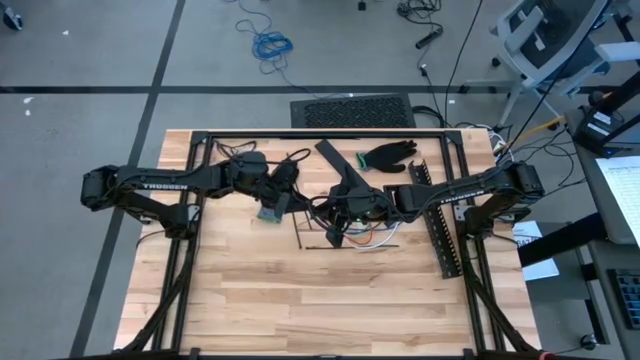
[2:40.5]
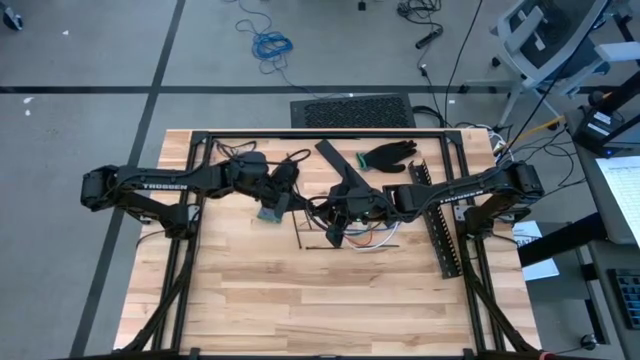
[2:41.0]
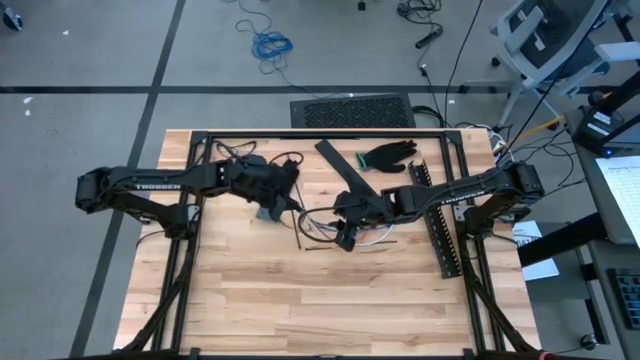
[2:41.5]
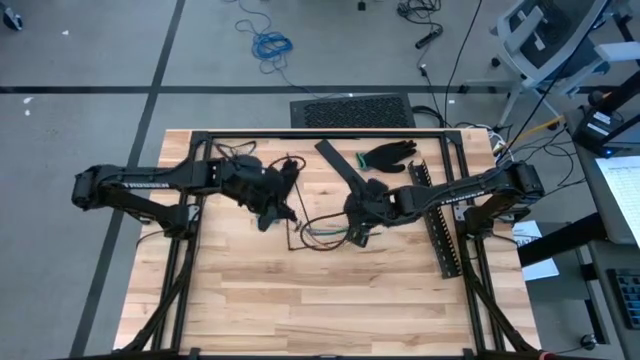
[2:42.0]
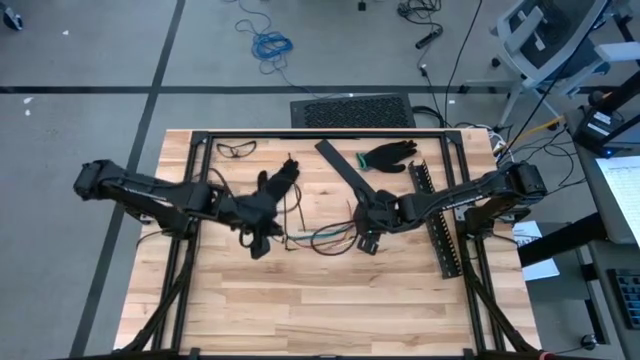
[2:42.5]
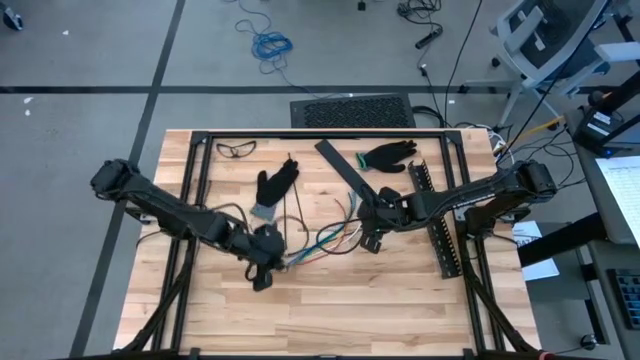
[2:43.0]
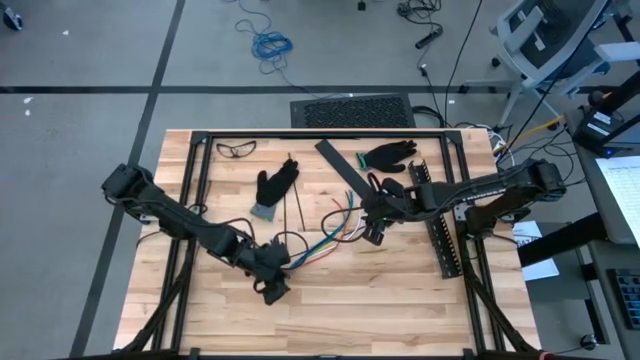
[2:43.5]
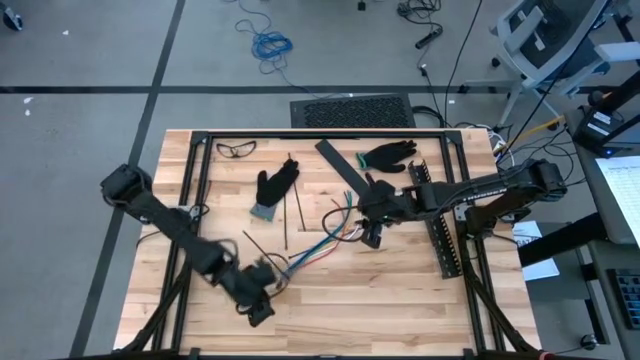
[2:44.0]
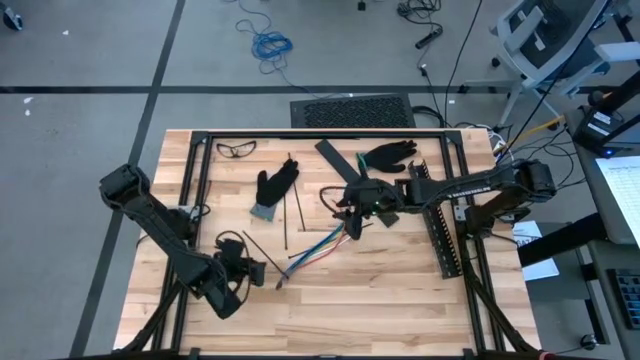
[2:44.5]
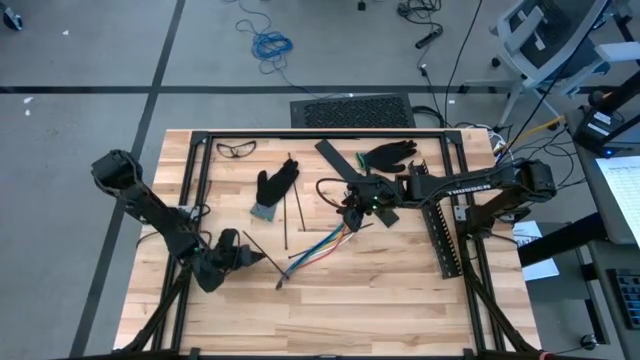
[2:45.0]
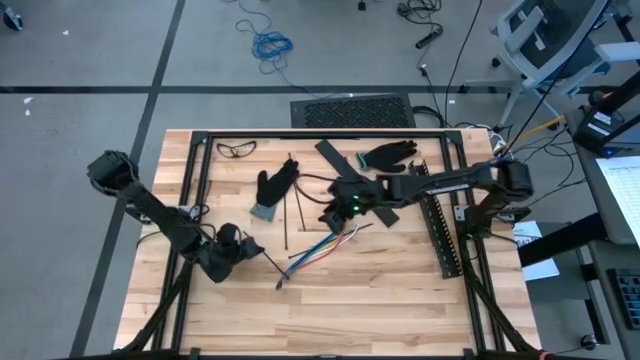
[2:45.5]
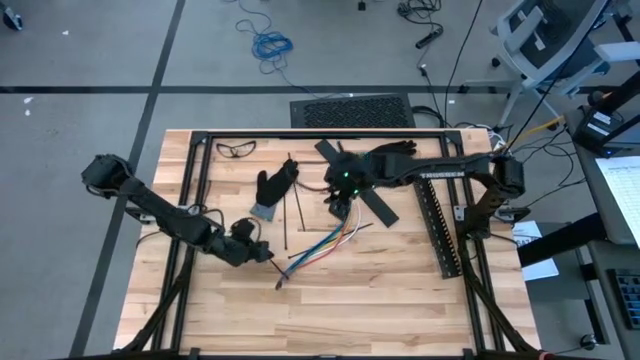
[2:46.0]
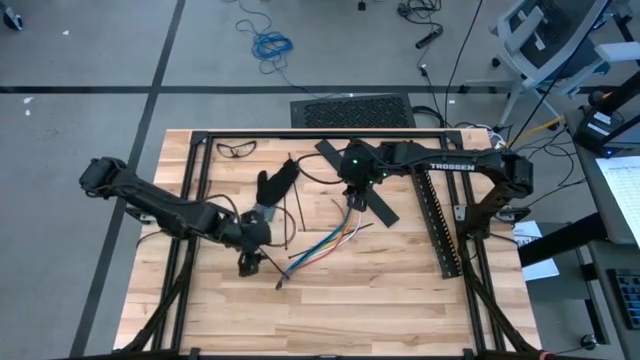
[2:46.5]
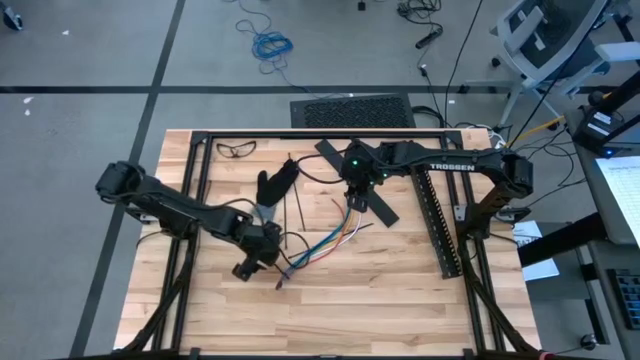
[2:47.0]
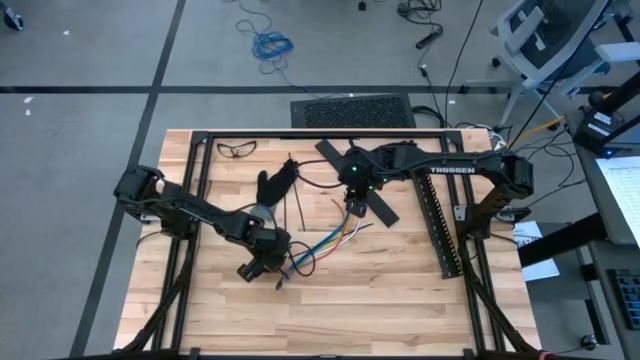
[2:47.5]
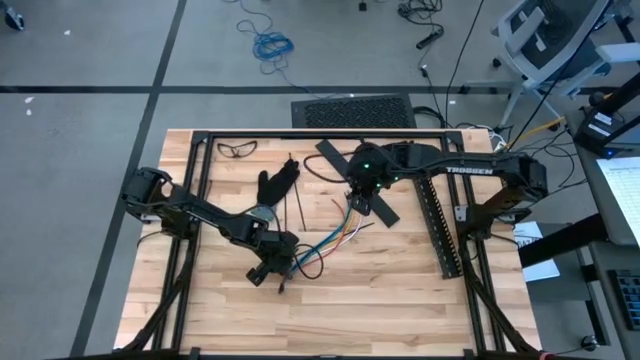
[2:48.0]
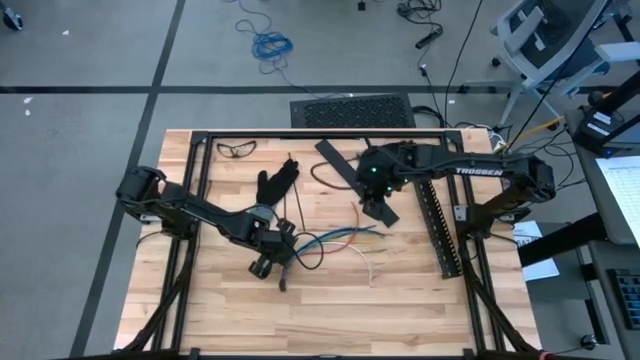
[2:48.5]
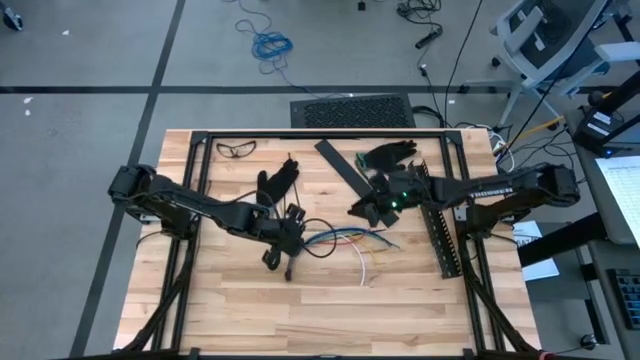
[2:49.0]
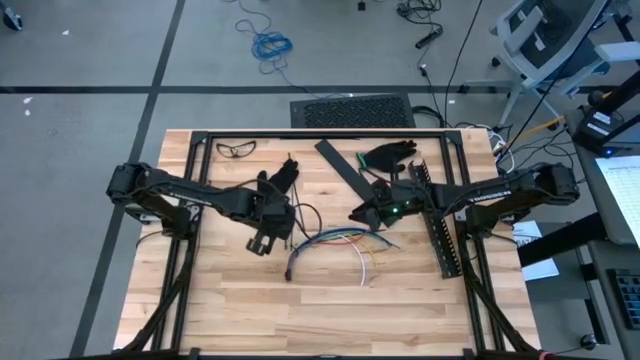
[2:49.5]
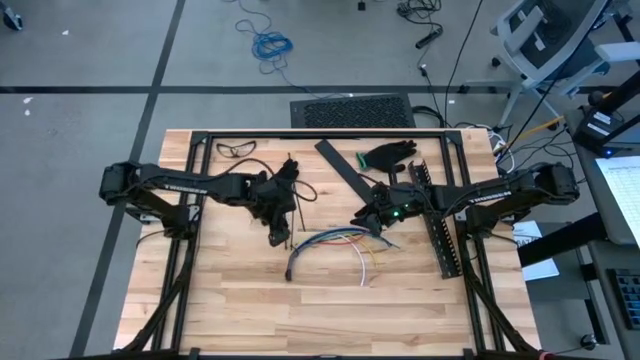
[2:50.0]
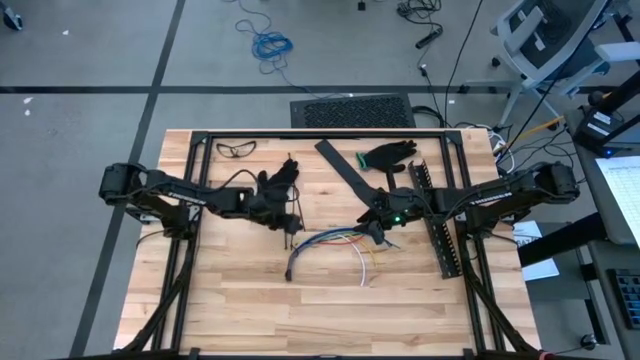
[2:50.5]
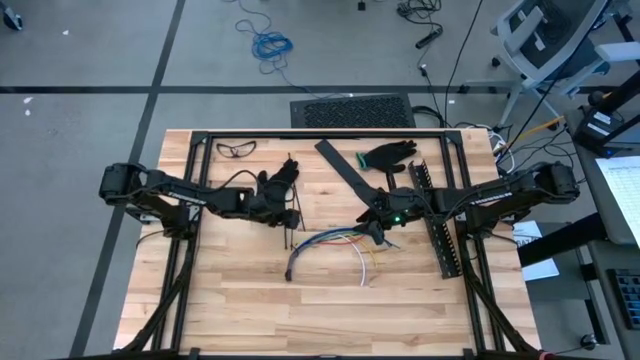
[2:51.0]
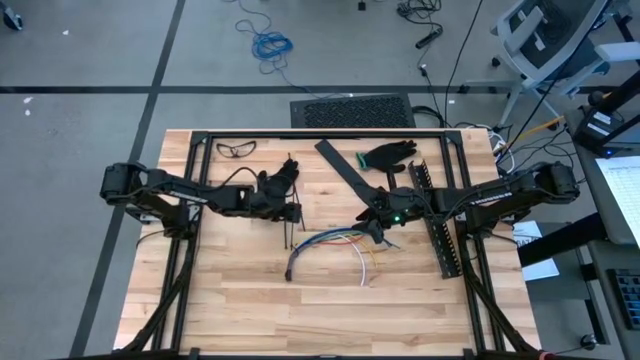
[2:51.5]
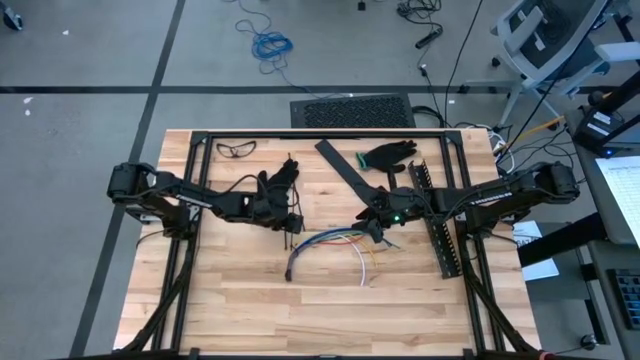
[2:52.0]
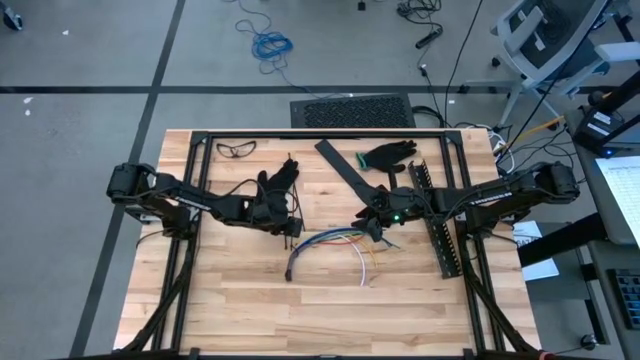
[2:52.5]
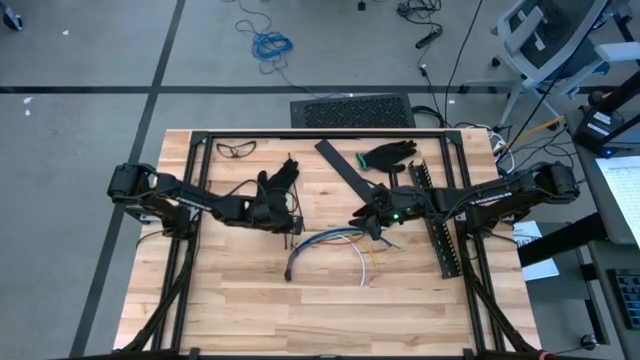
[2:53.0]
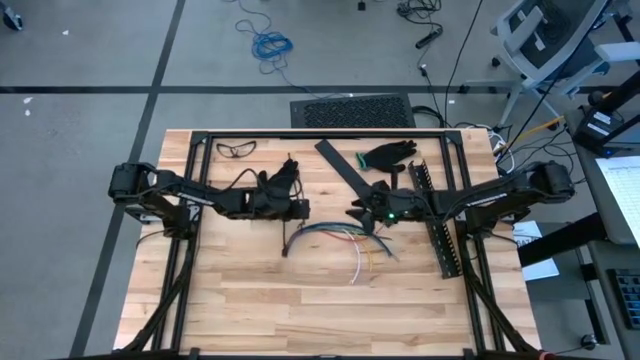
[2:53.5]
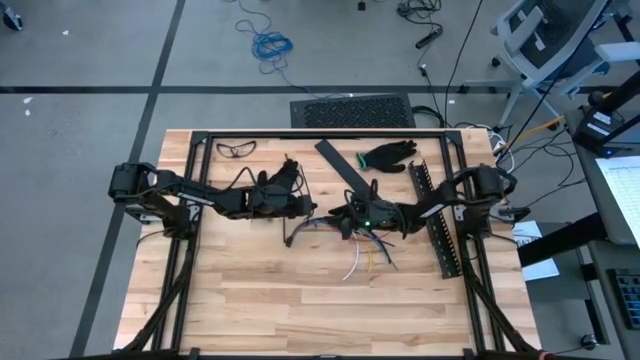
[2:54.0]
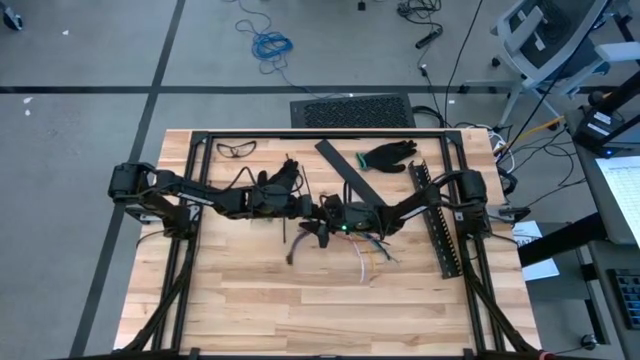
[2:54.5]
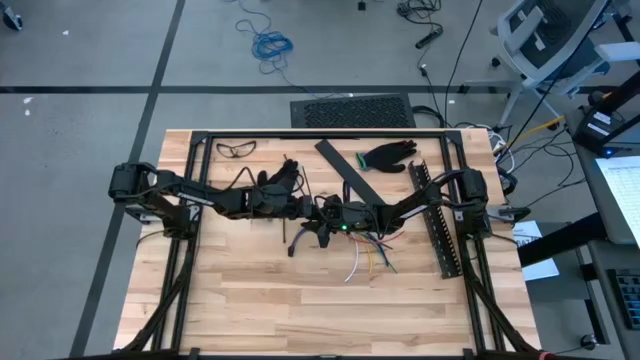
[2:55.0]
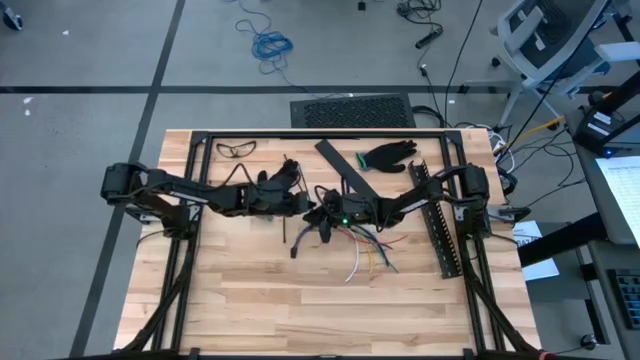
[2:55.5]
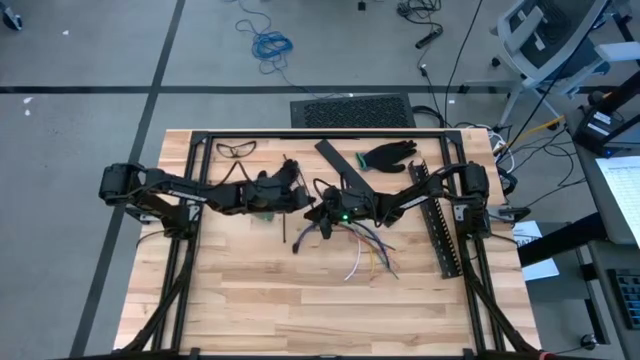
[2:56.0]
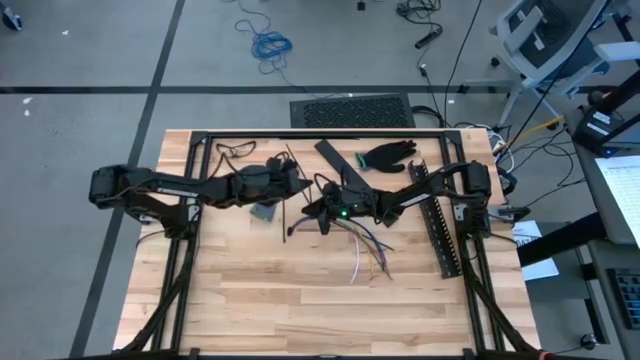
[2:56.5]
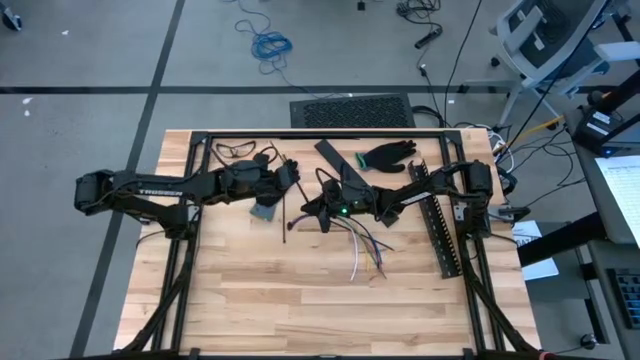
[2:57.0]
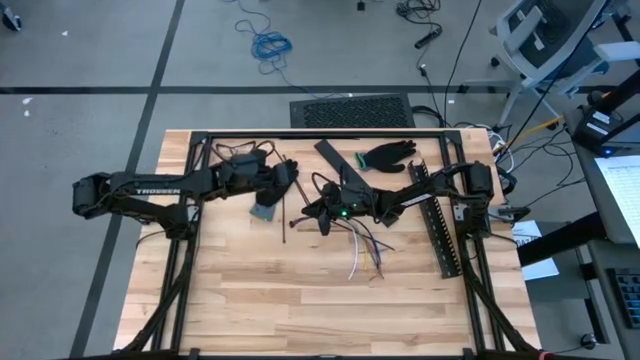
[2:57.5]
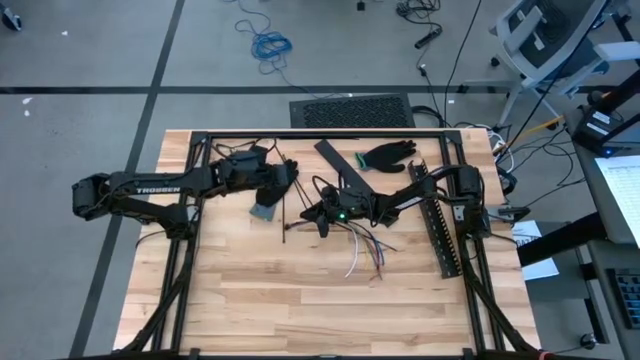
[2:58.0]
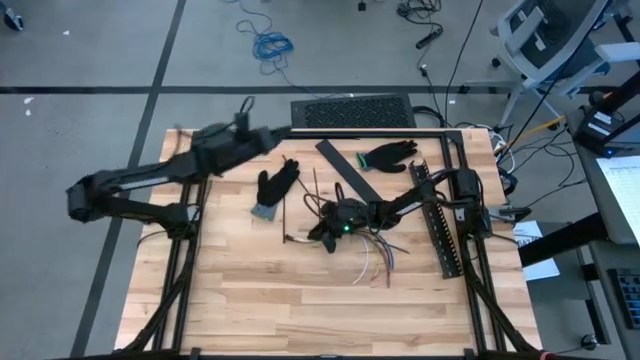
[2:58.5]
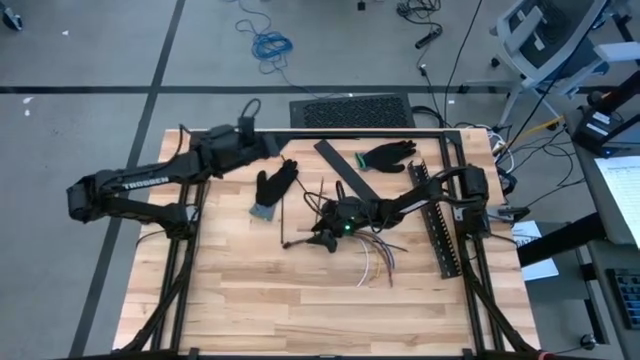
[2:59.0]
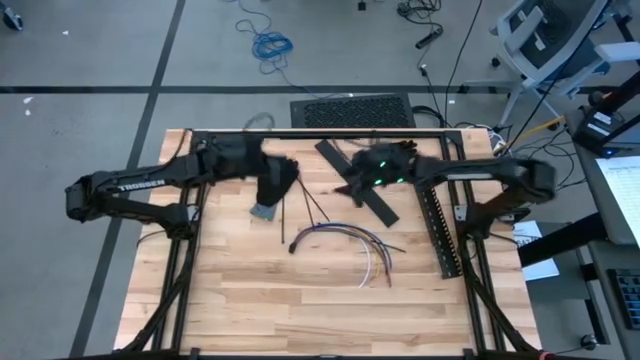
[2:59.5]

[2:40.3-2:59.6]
Task: Ziptie cables
Wrap the black zip tie on the cable

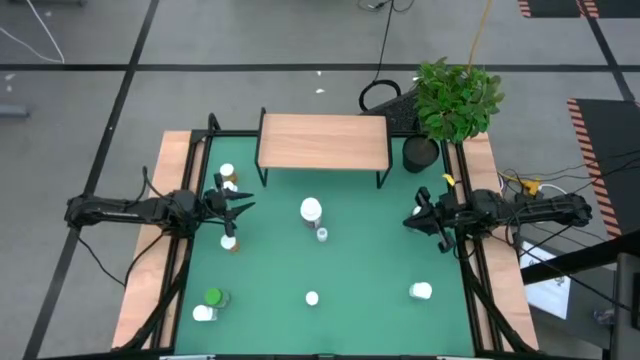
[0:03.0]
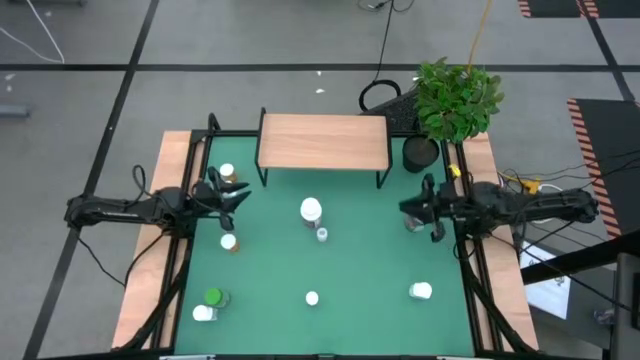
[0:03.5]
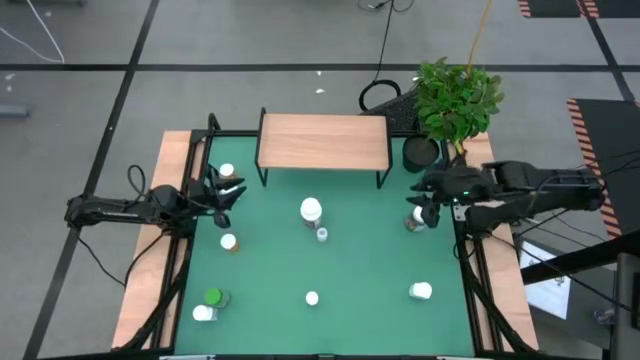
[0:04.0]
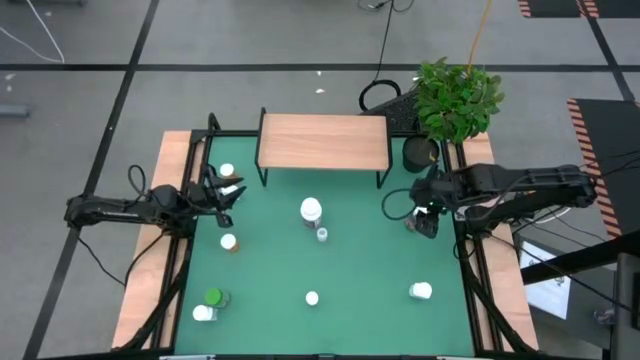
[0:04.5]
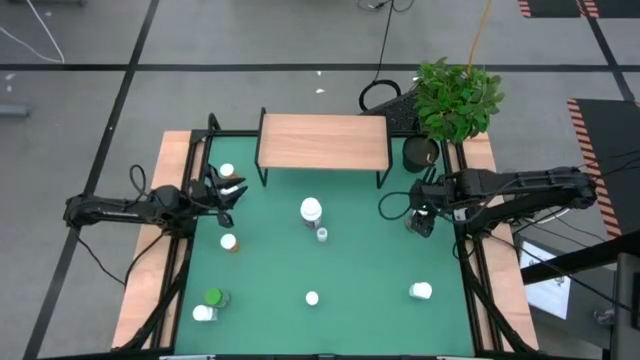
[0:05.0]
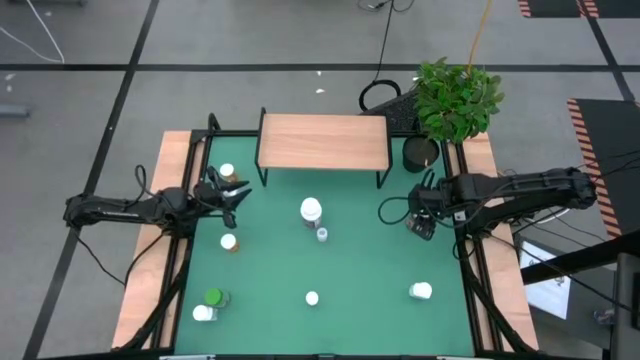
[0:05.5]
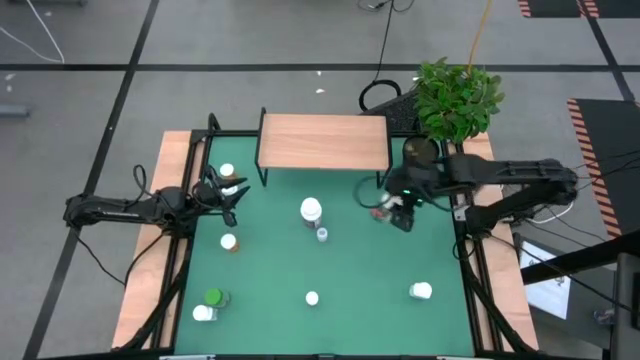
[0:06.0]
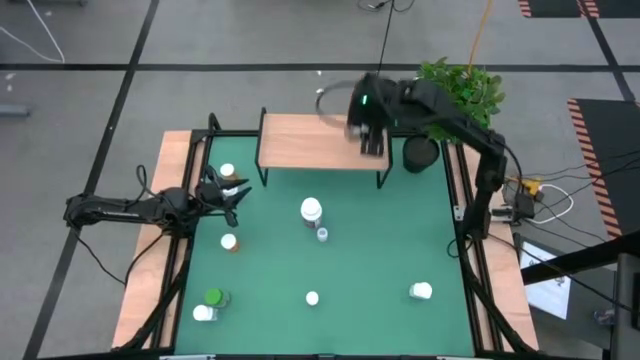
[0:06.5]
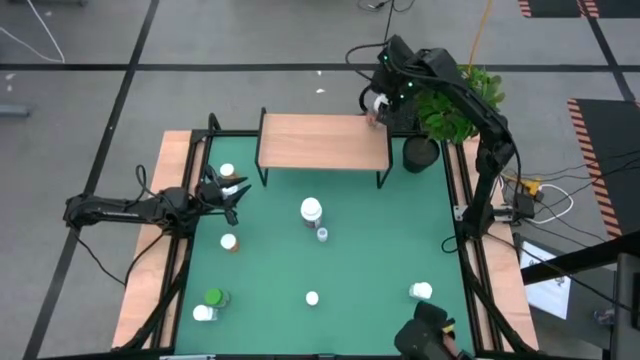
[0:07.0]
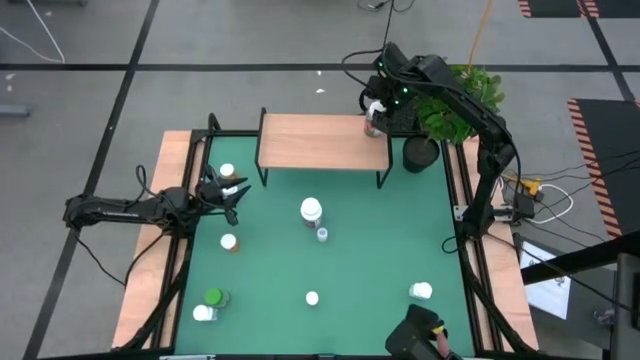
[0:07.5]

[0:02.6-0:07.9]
Task: Pick and place medicine bottles onto shelf by color
Put the big transparent pill bottle on the shelf
